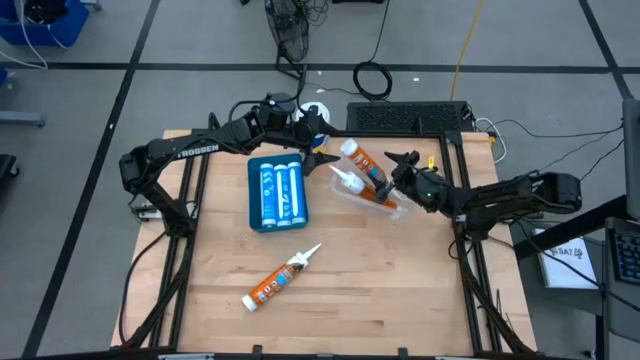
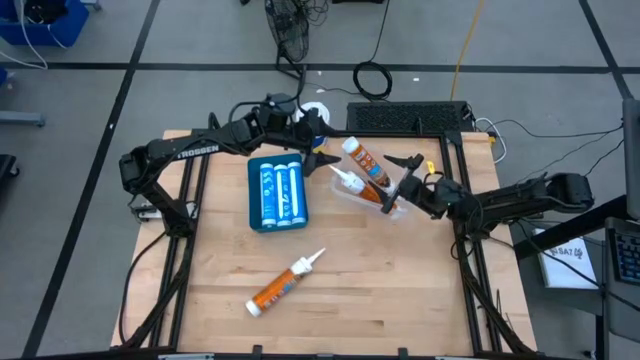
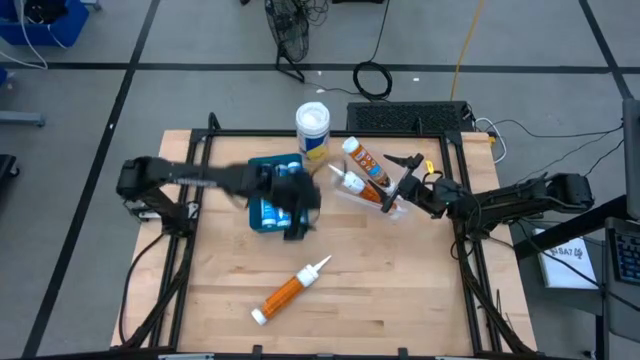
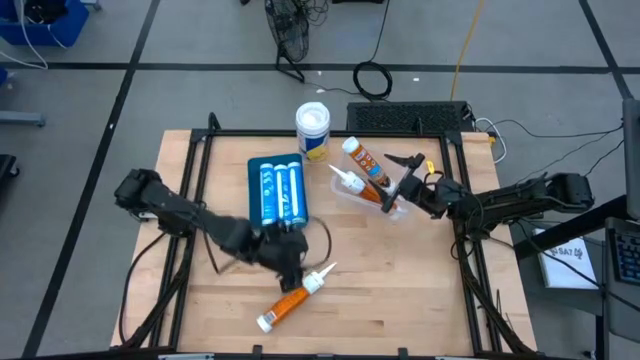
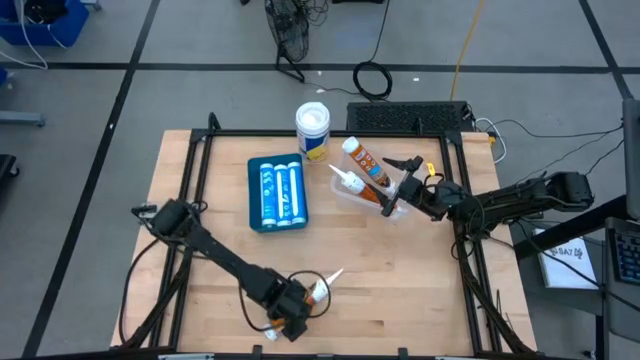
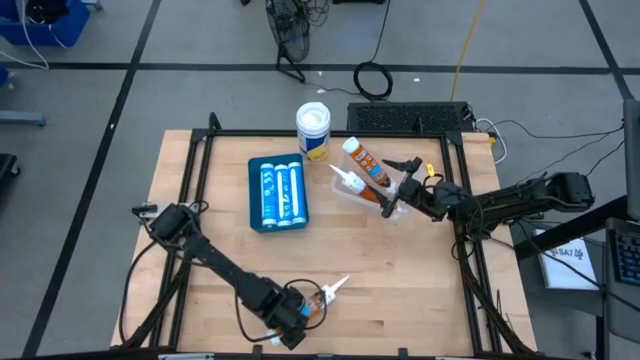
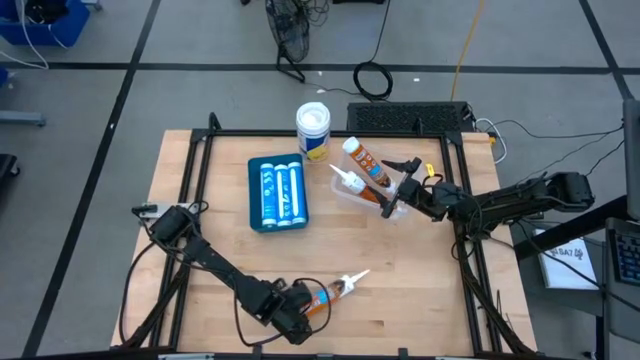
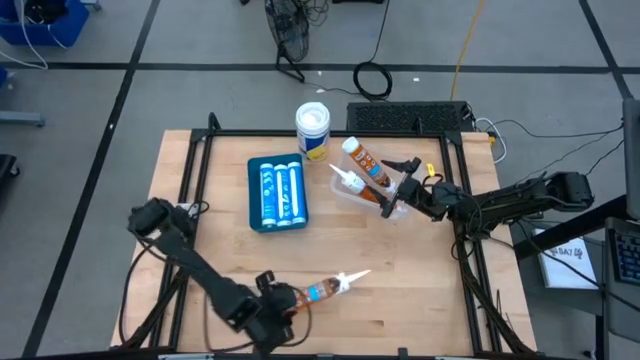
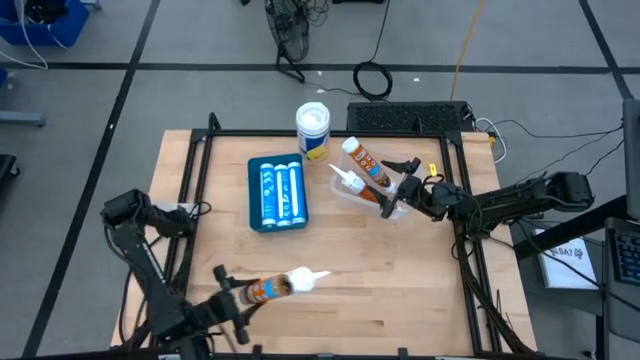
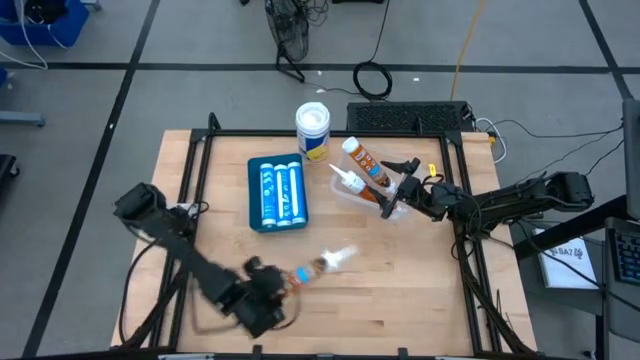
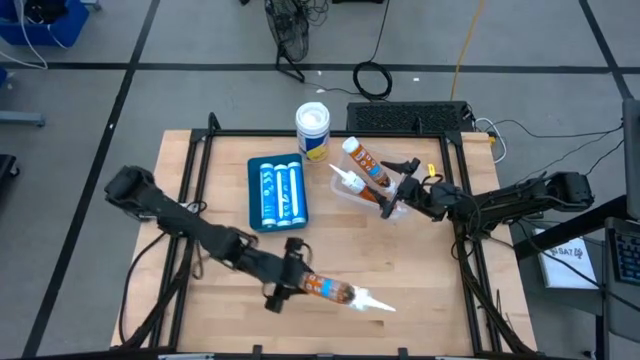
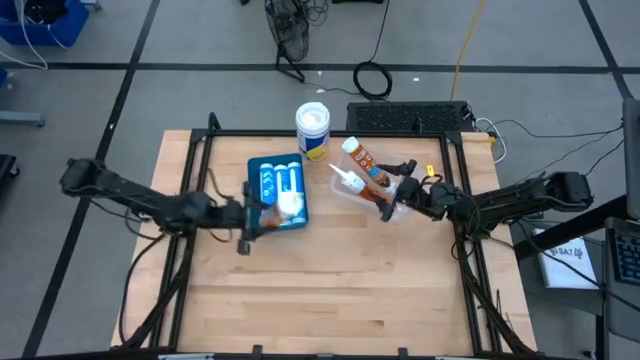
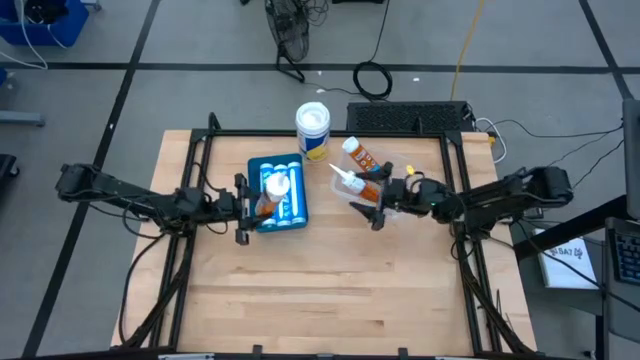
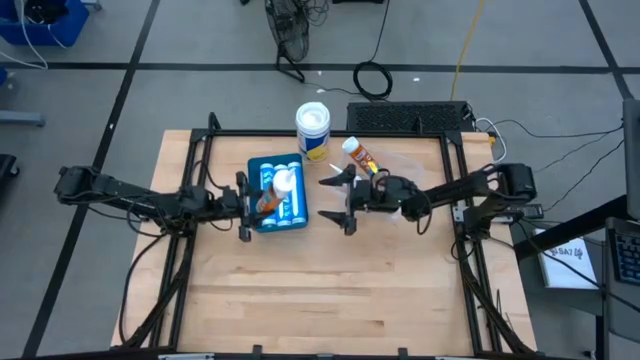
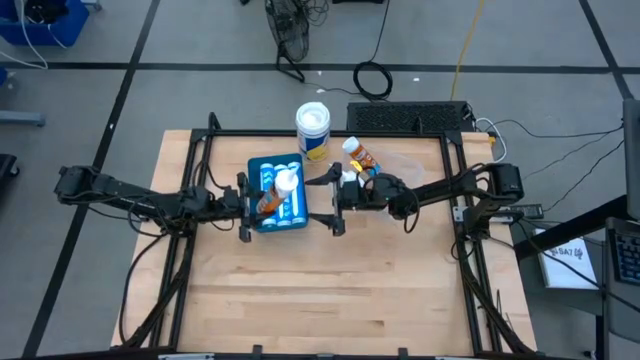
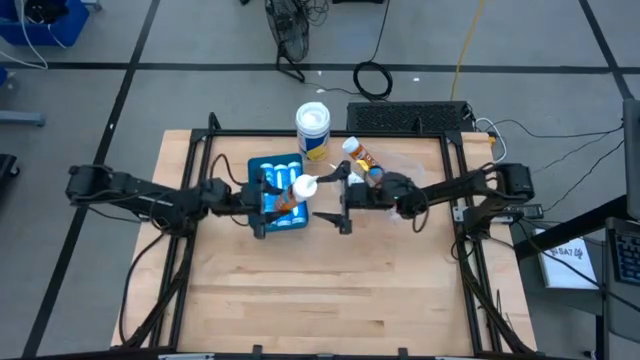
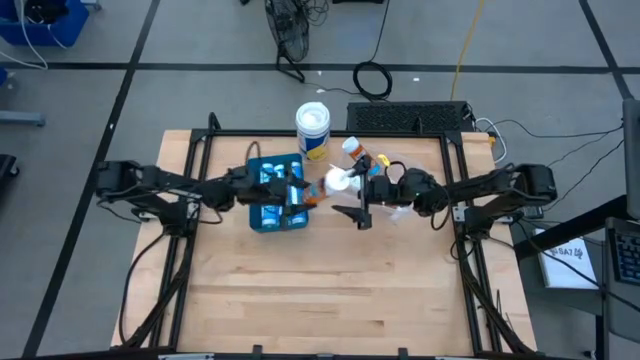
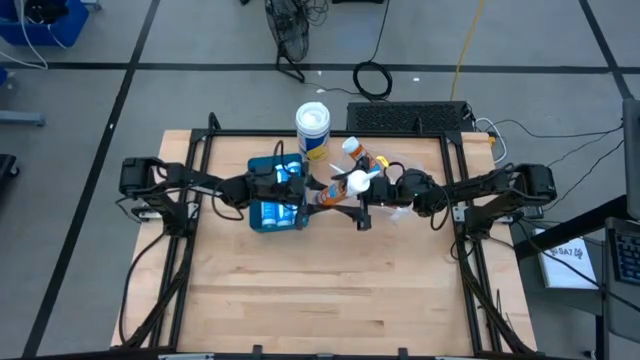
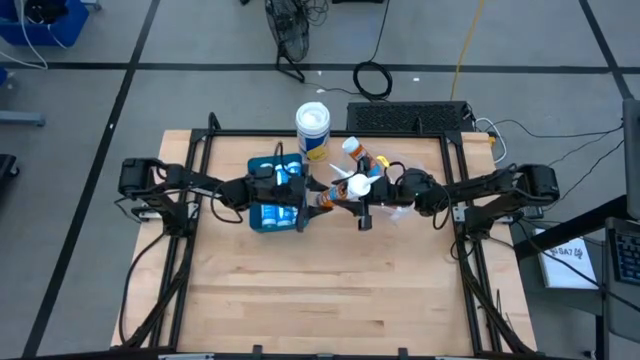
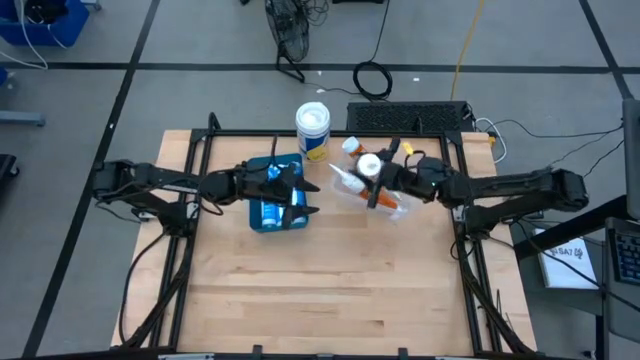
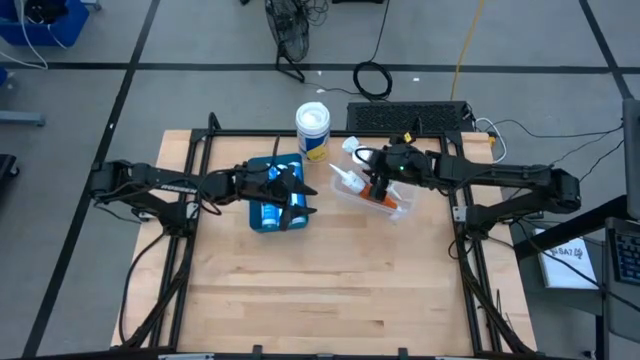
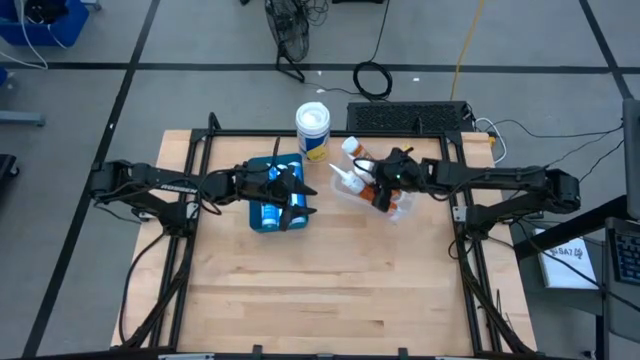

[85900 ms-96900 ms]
Task: Pick & place silicon tubes, Sealant and Lysol wipes
Put the orange caulk tube into the transparent bin

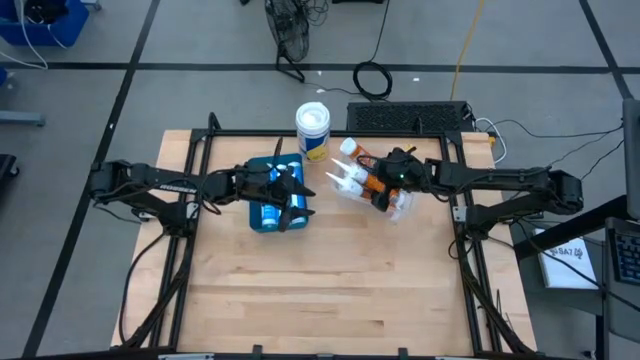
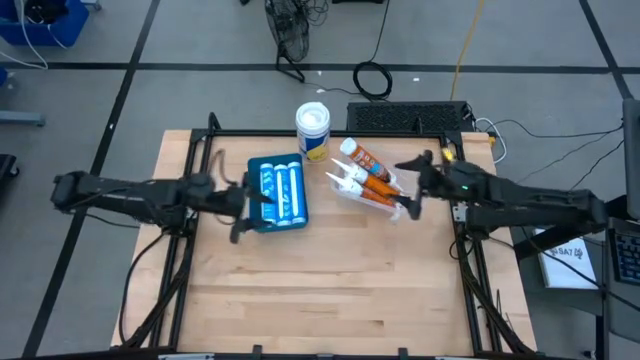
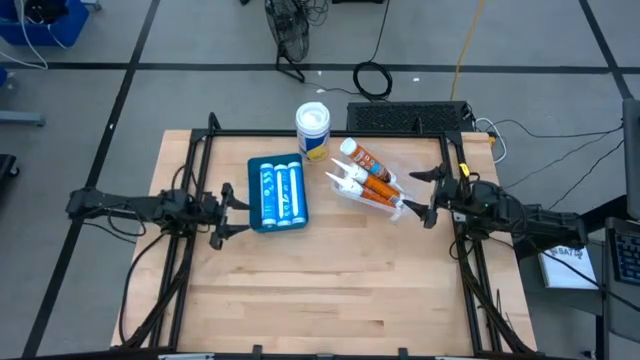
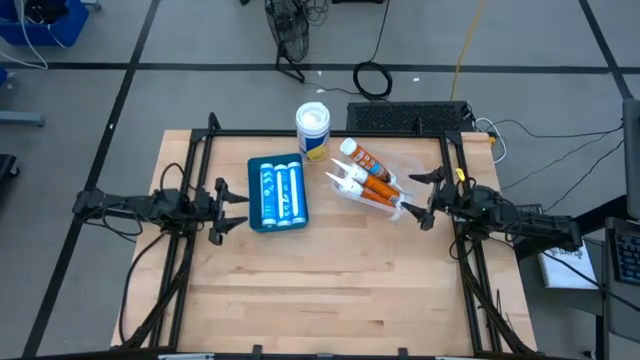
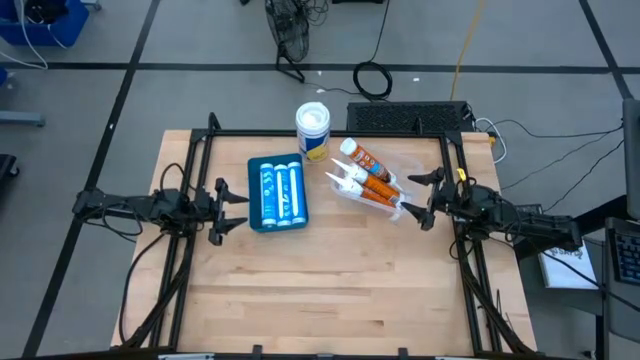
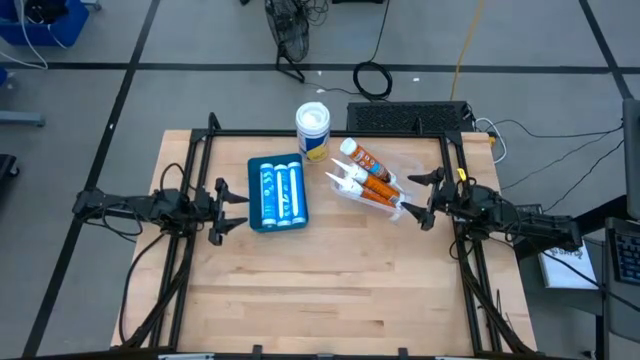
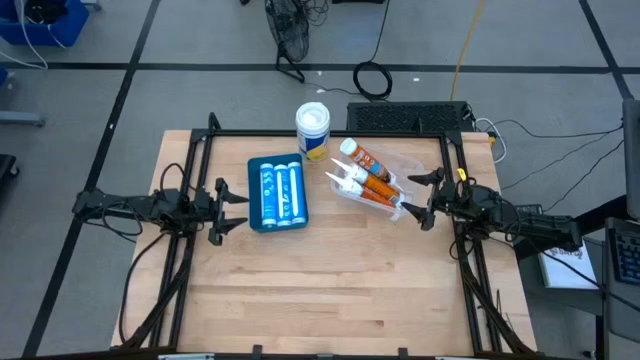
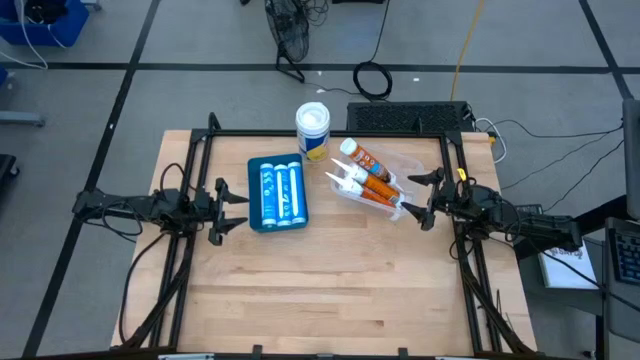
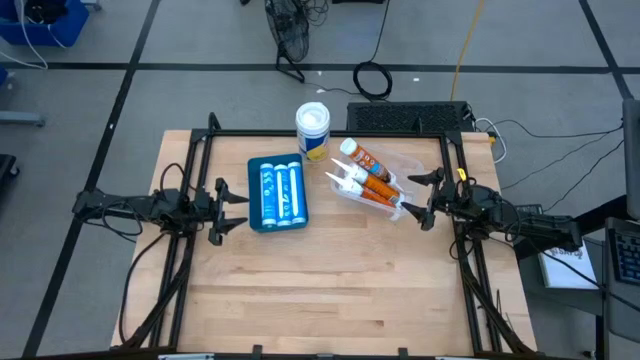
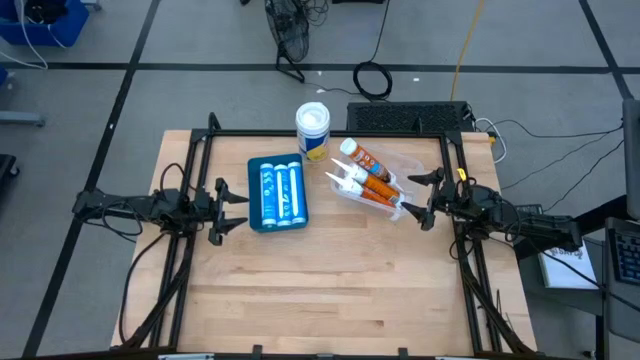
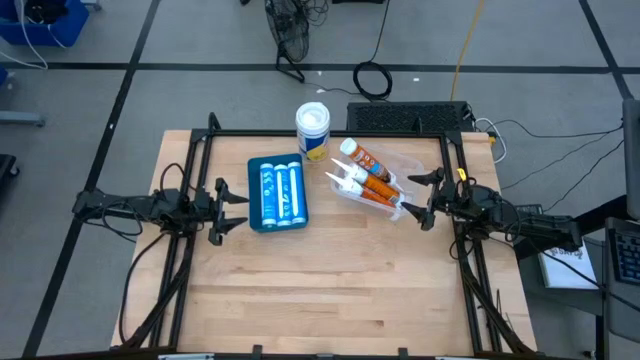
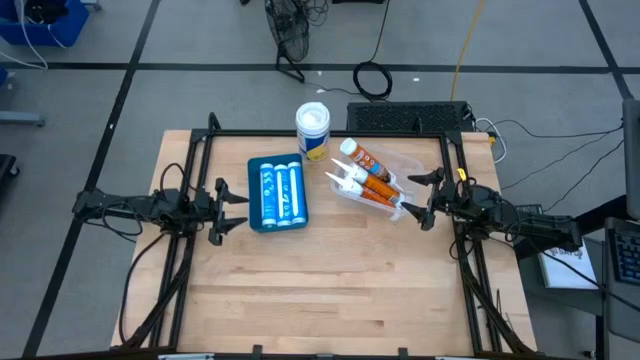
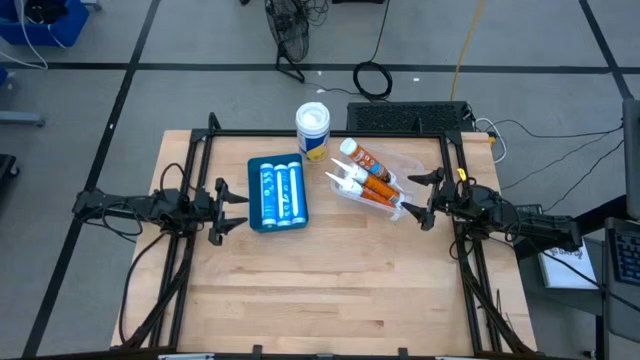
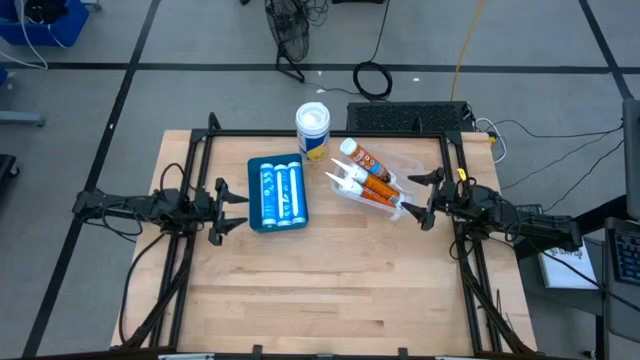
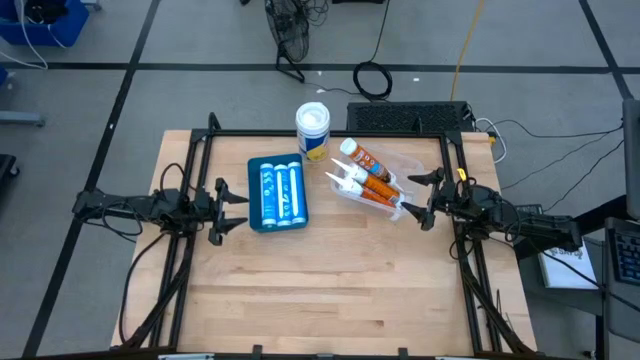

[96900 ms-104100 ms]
Return to Home Position

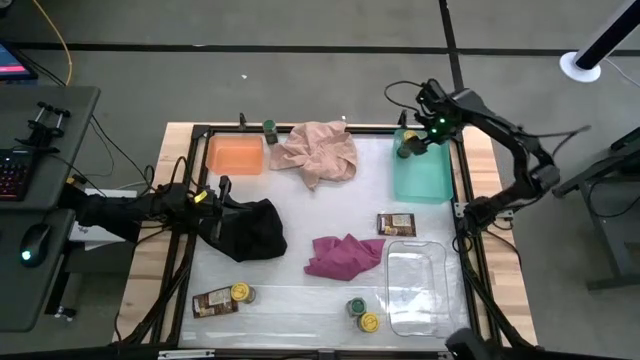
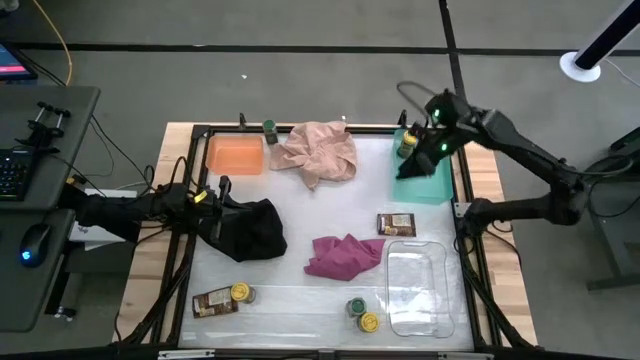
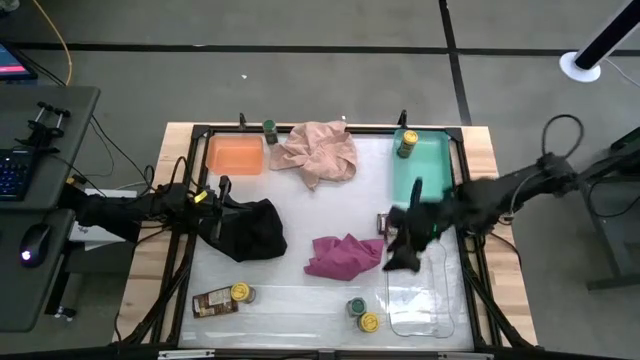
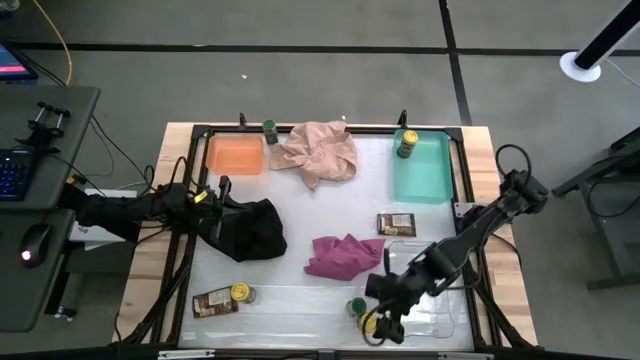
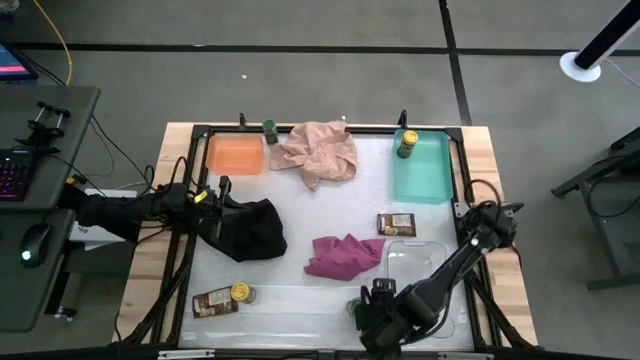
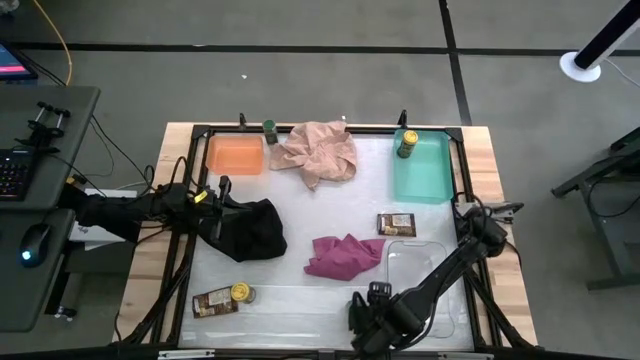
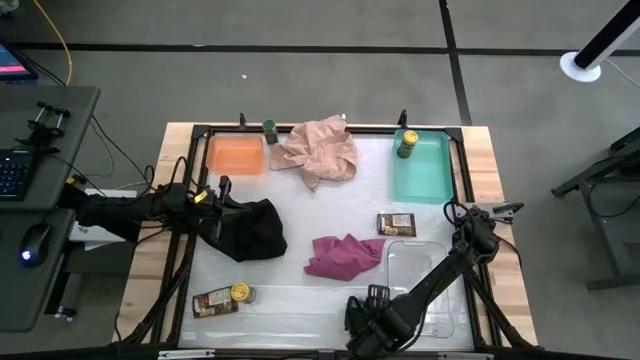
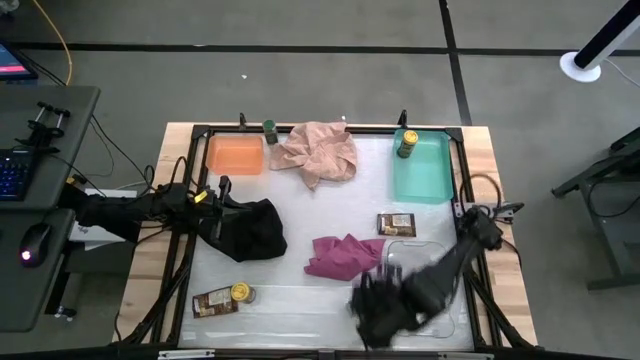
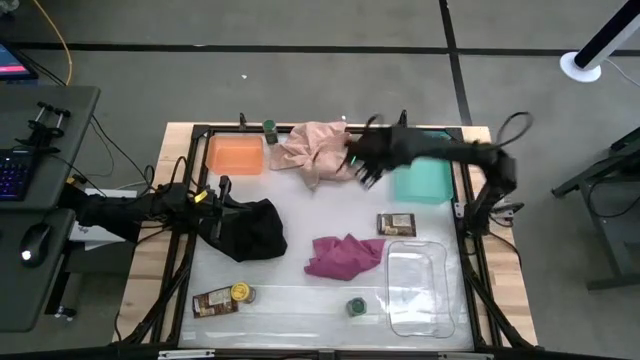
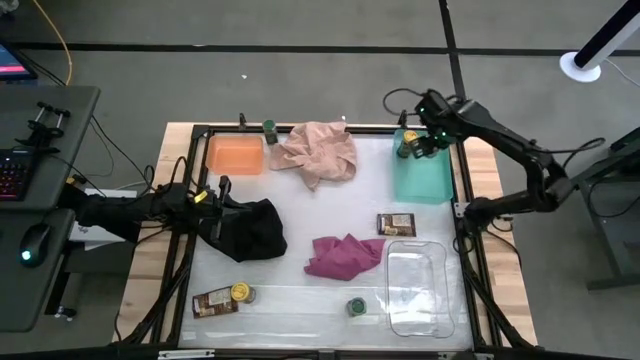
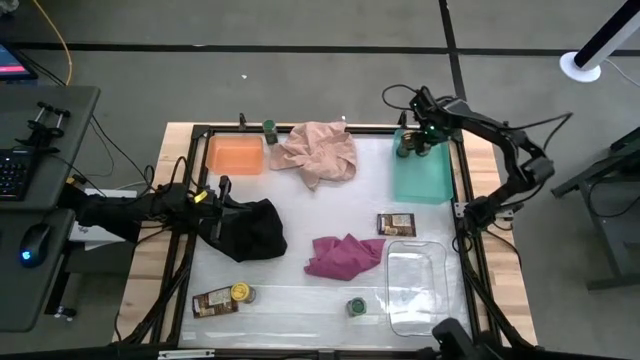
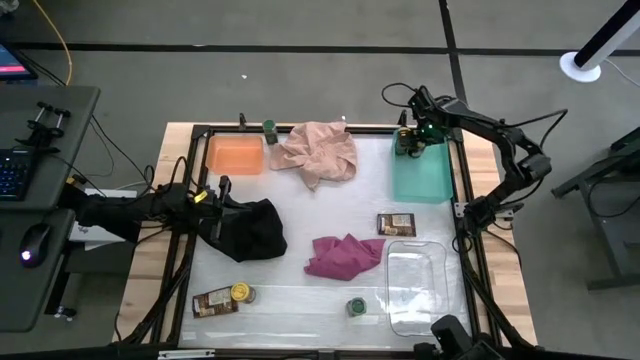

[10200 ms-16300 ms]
Task: Sort spices by type
Put the right yellow seasoning bottle into the blue bin
